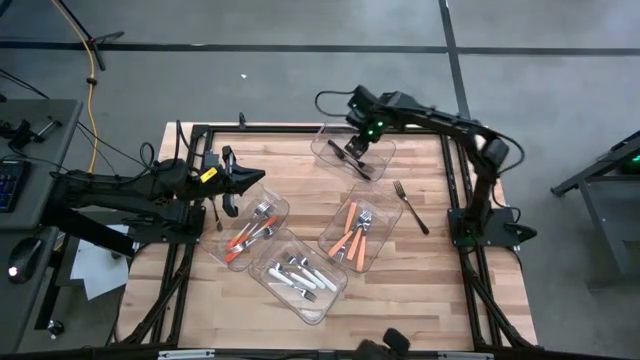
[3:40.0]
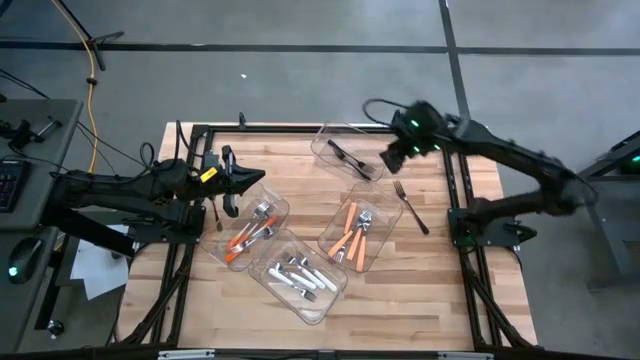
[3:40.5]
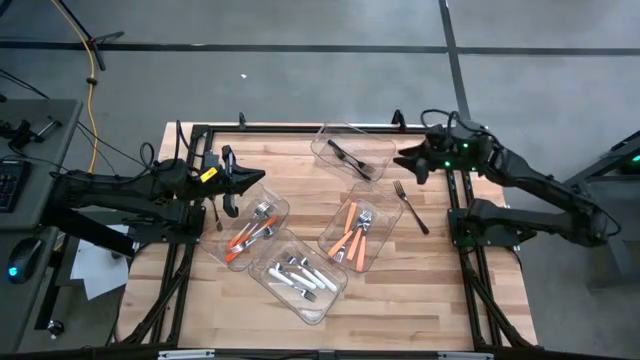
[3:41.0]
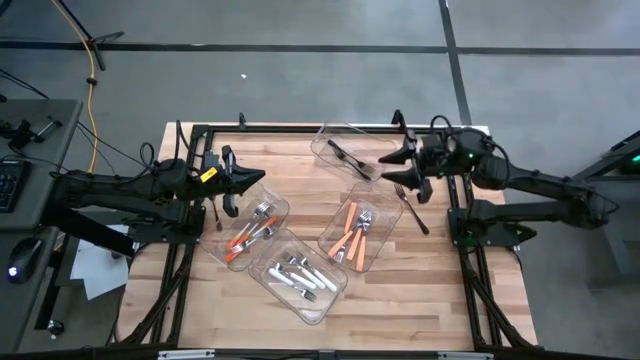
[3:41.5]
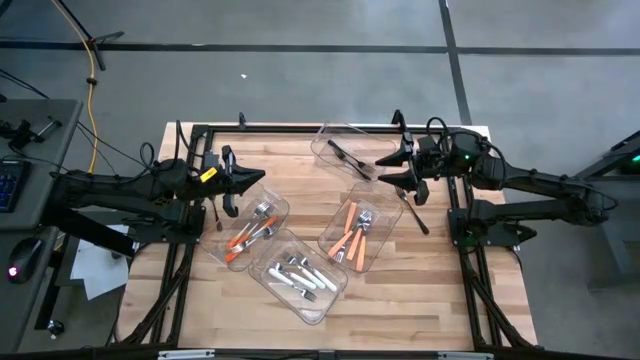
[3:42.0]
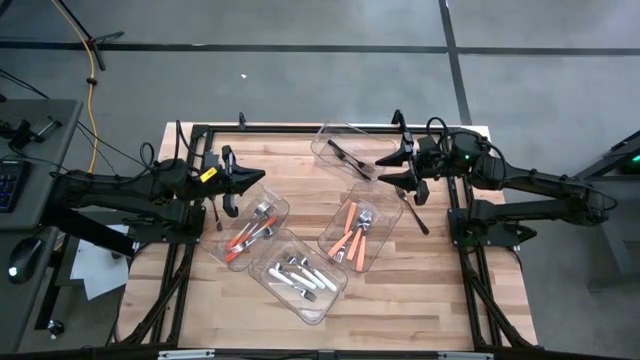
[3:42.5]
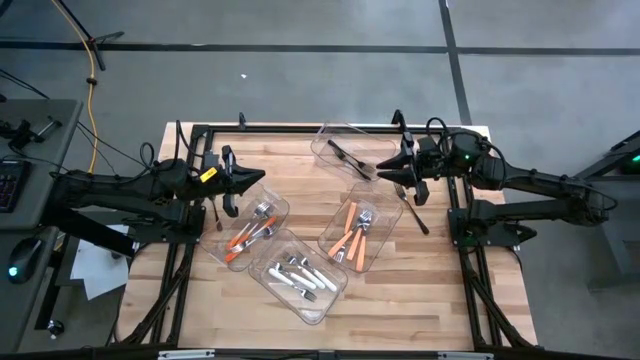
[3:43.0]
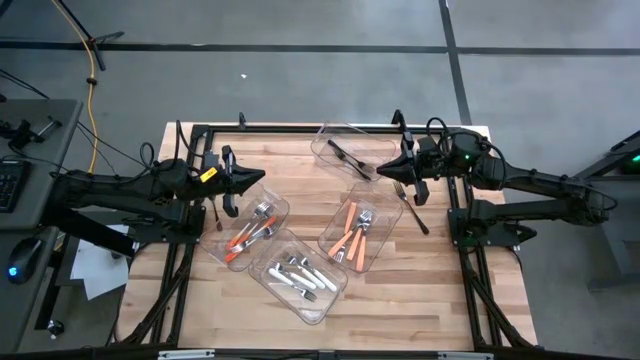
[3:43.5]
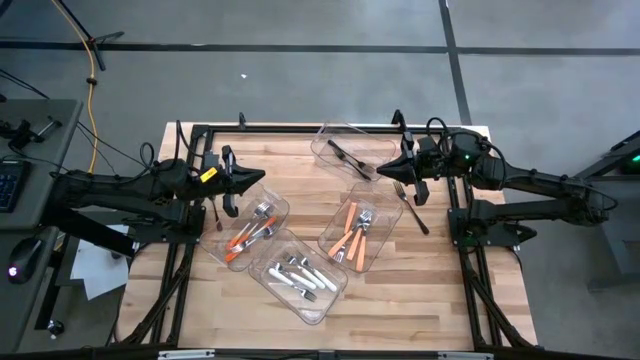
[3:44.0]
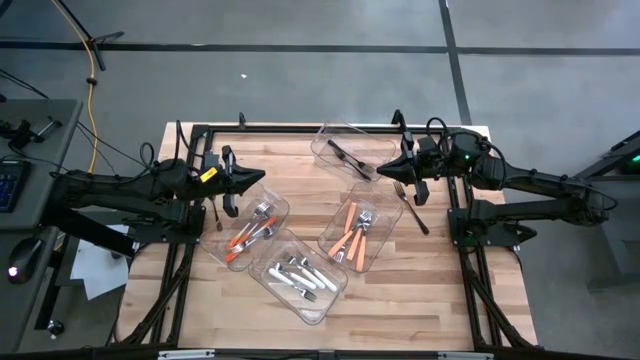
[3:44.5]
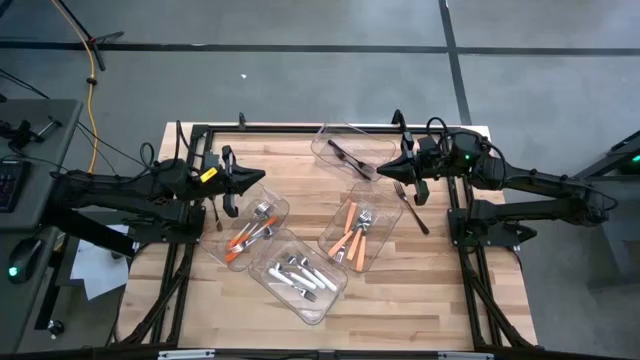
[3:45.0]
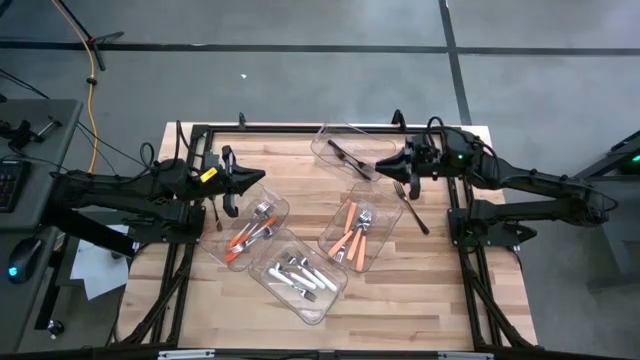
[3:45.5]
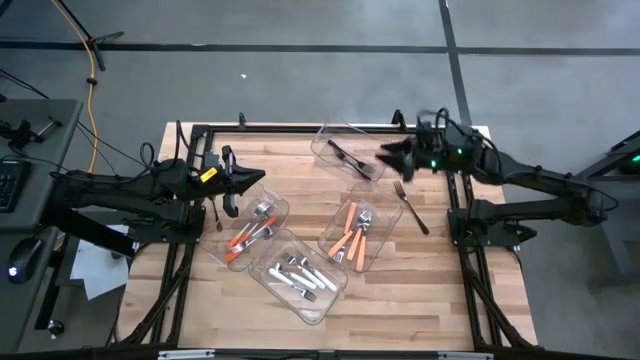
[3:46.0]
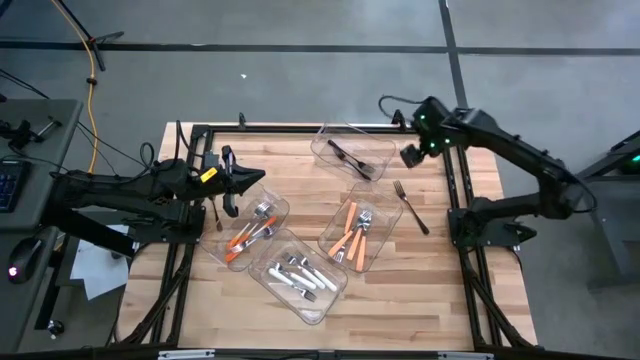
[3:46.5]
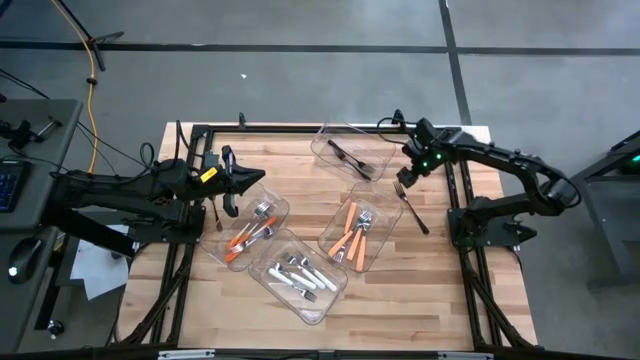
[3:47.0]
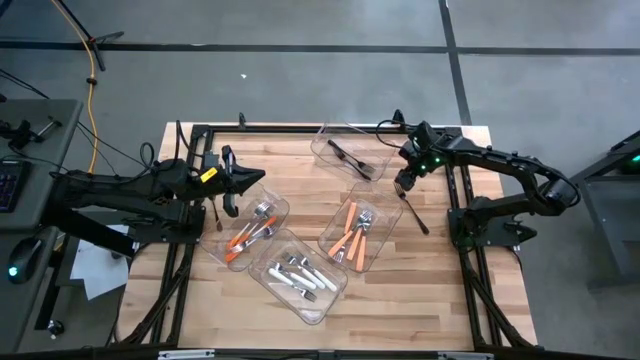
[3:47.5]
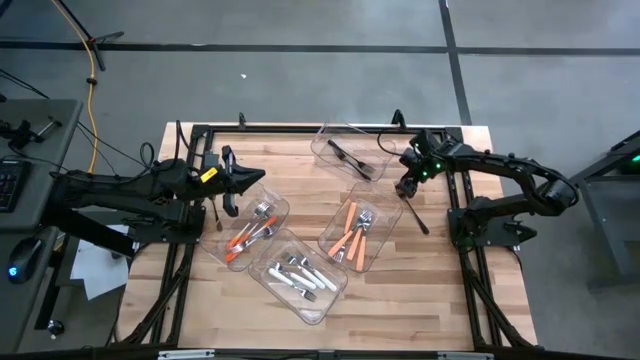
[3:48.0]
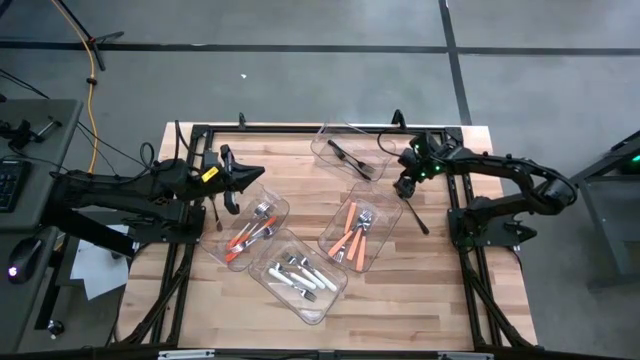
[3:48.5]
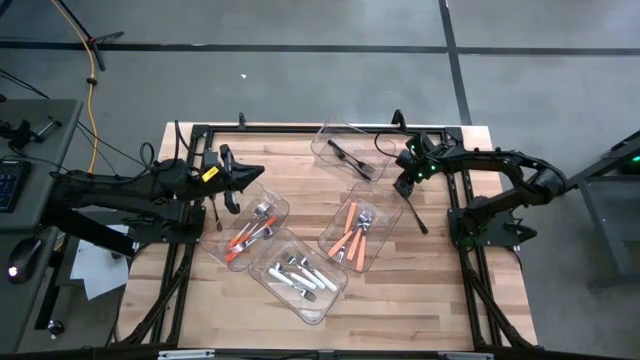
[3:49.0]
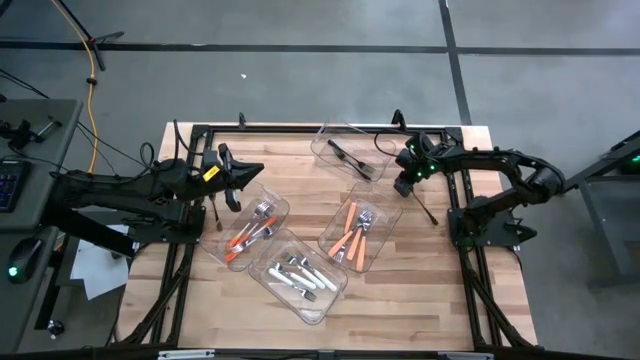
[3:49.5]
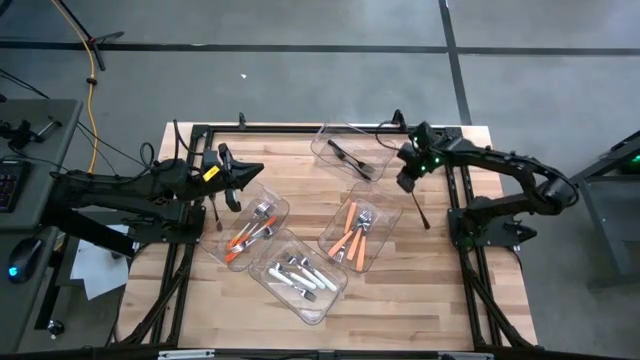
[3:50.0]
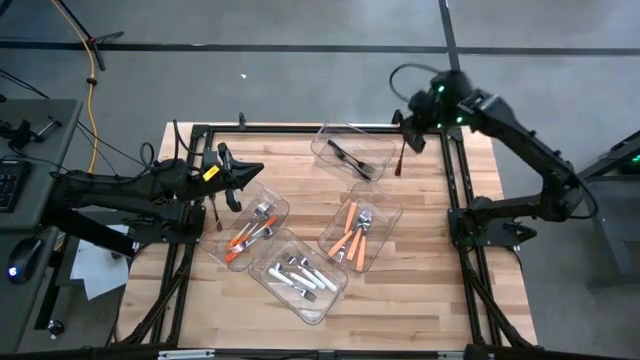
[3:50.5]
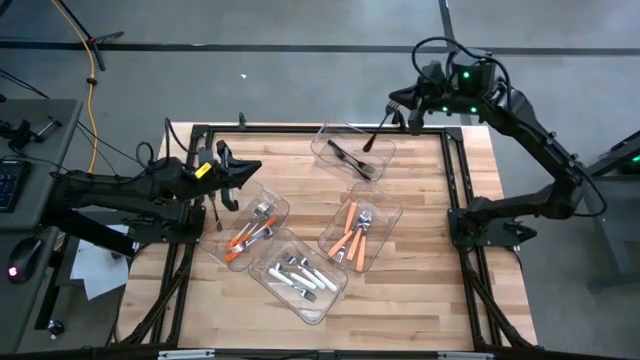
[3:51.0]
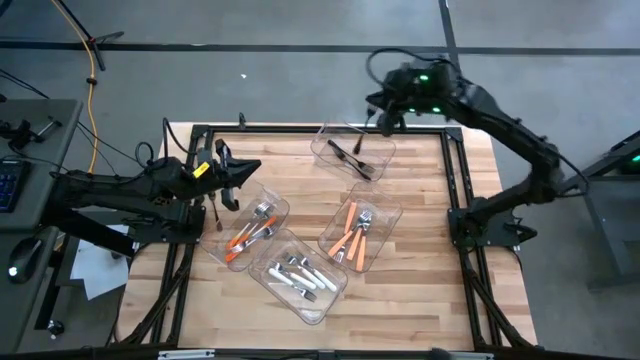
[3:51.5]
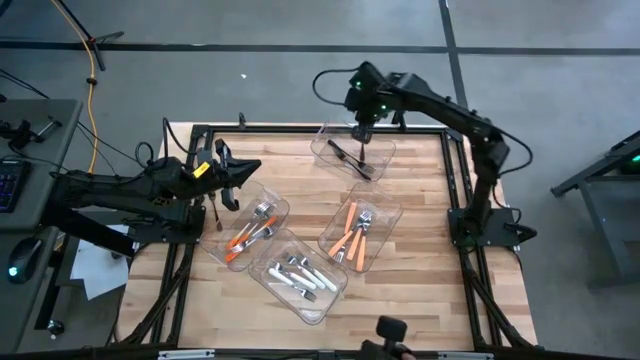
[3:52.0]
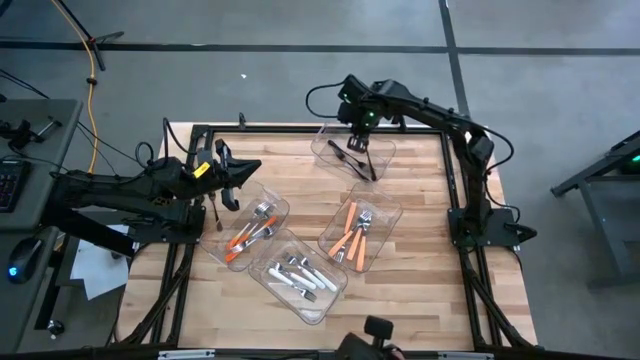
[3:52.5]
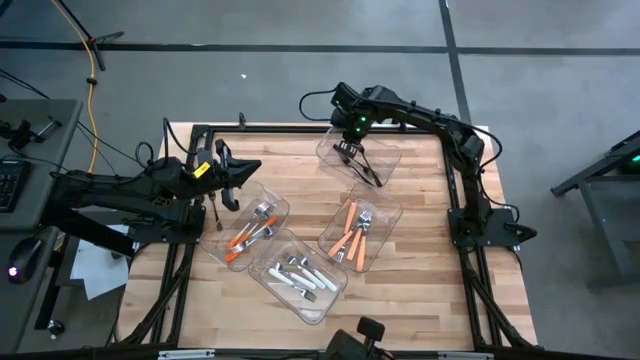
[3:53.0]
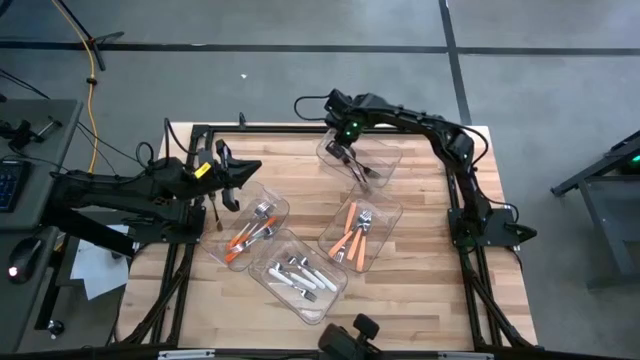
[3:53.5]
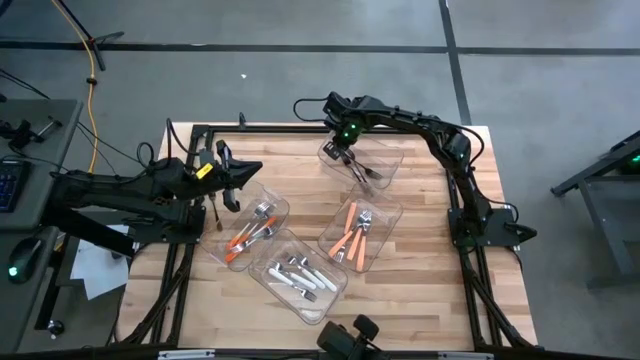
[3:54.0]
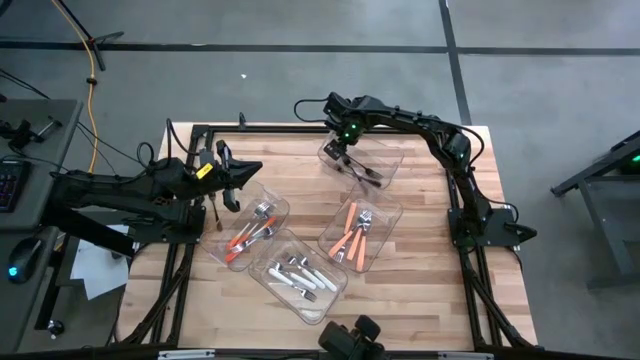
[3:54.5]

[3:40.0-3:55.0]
Task: Sort silverware by color (type)
Put the black fork into the top transparent bin

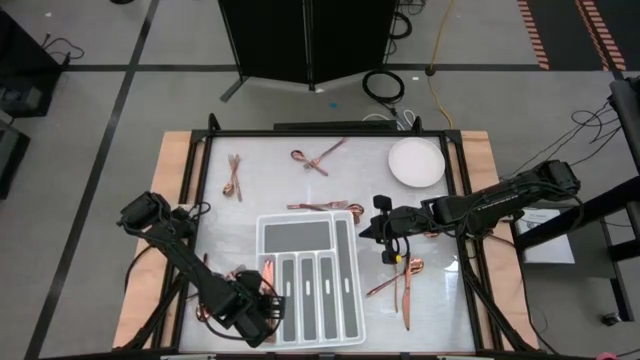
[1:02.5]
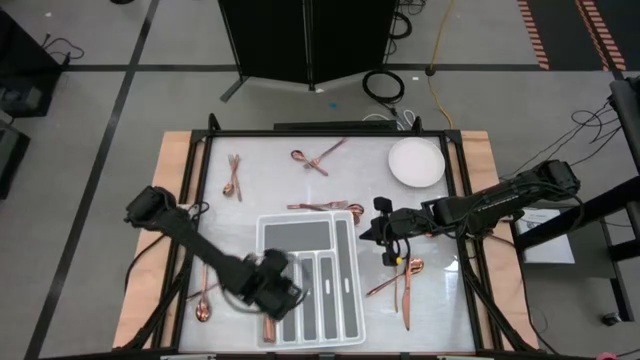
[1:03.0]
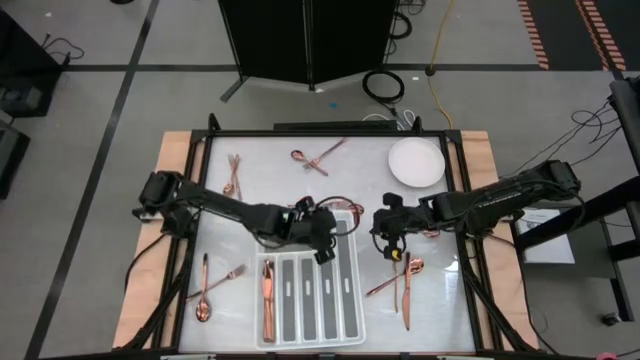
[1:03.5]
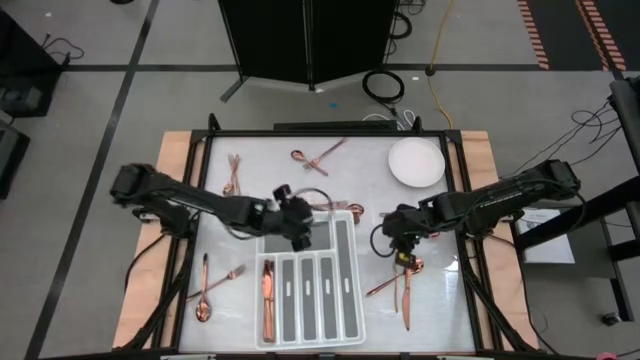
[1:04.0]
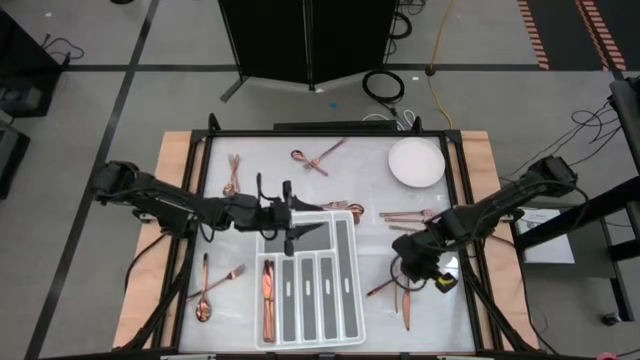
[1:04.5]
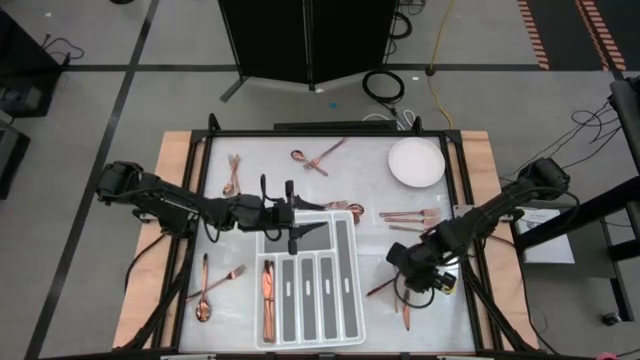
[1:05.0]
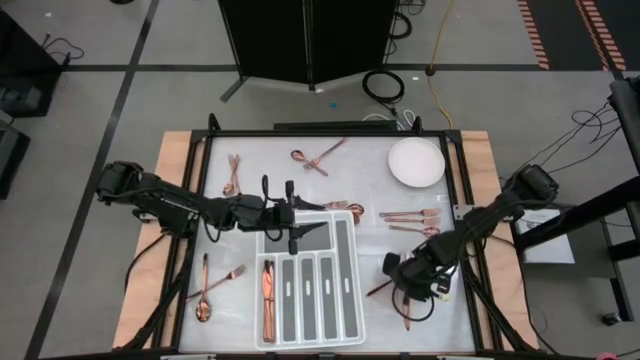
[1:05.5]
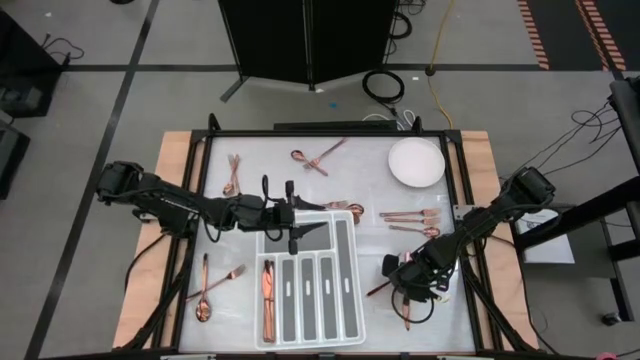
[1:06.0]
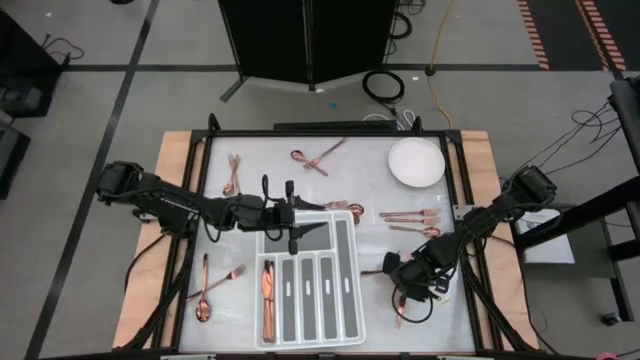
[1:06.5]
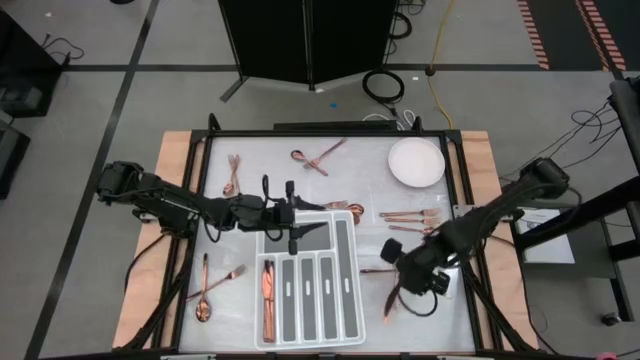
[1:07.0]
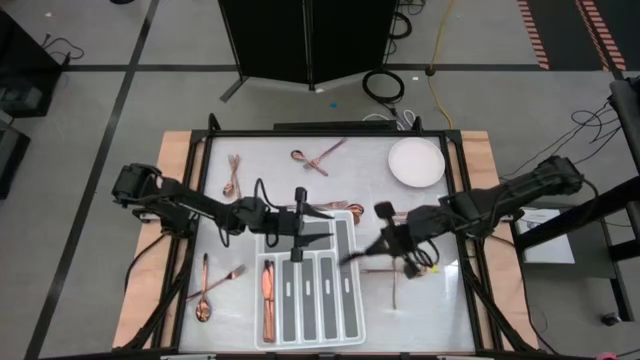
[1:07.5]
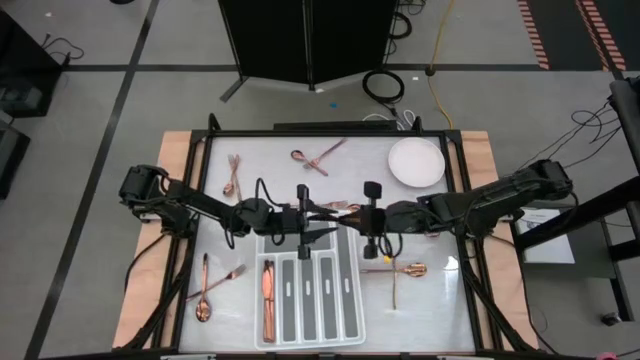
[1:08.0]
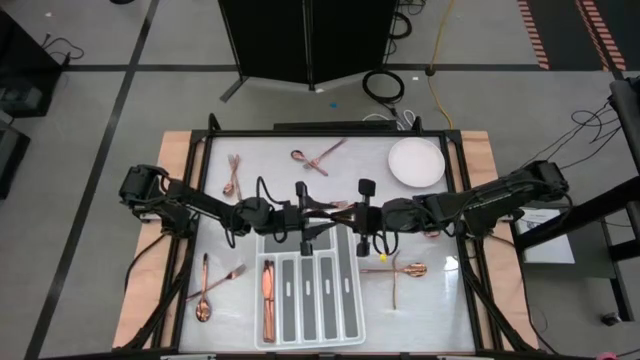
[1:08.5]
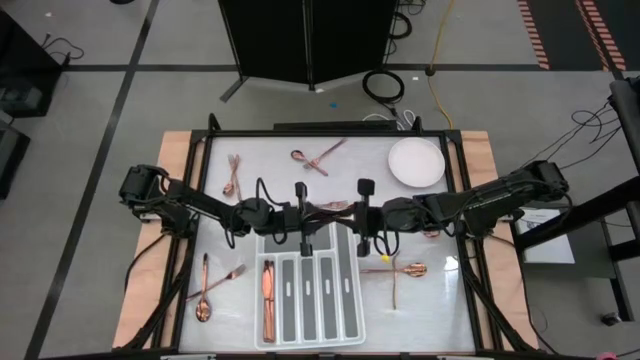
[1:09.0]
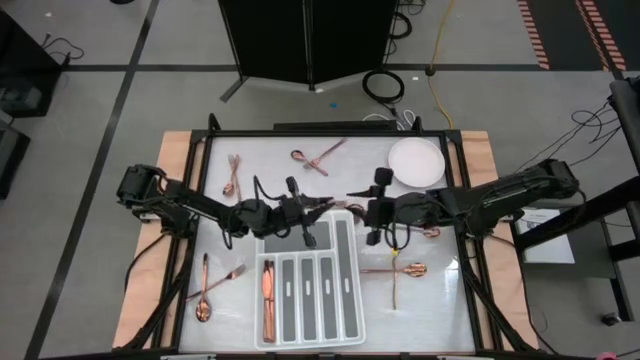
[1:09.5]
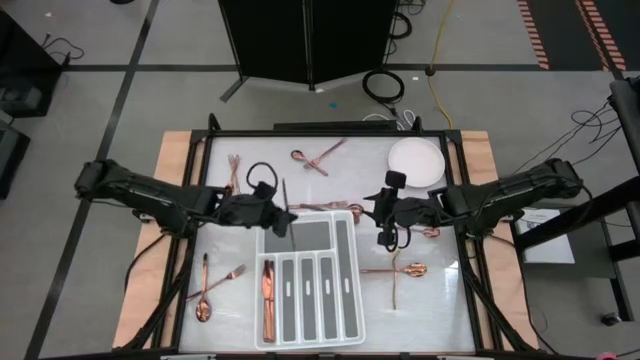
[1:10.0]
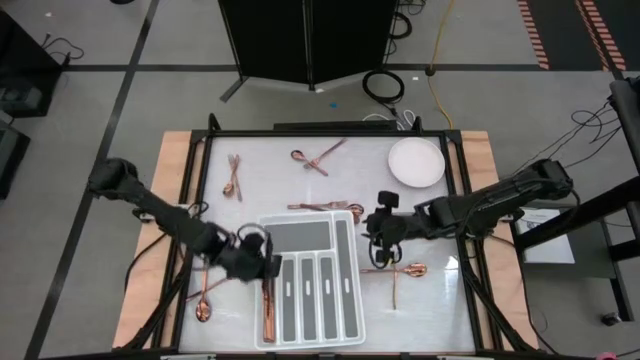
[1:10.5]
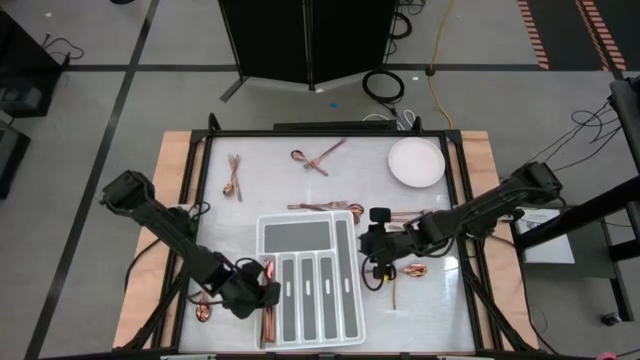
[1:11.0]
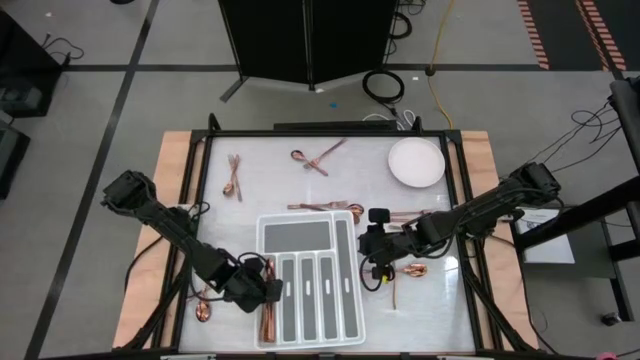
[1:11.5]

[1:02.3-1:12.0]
Task: Sort silverware
Put the knife into the silverware tray
